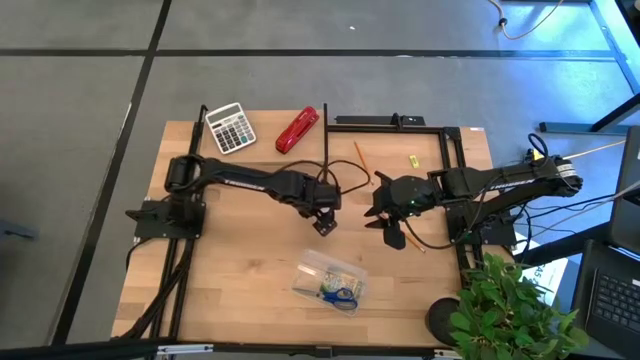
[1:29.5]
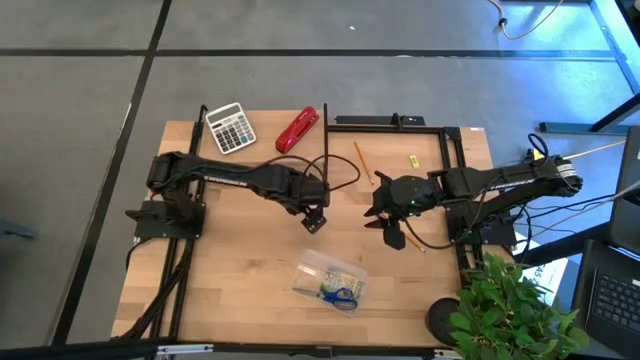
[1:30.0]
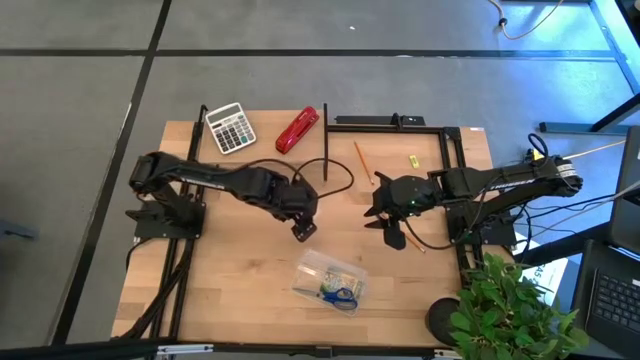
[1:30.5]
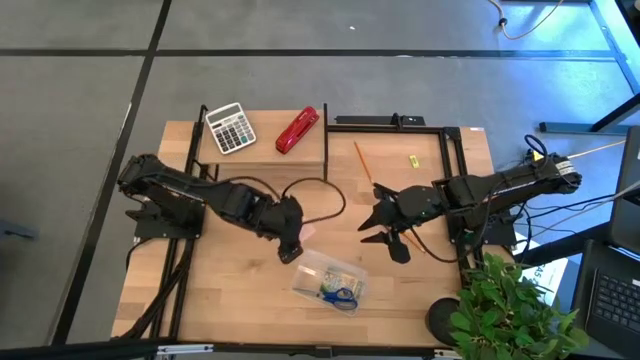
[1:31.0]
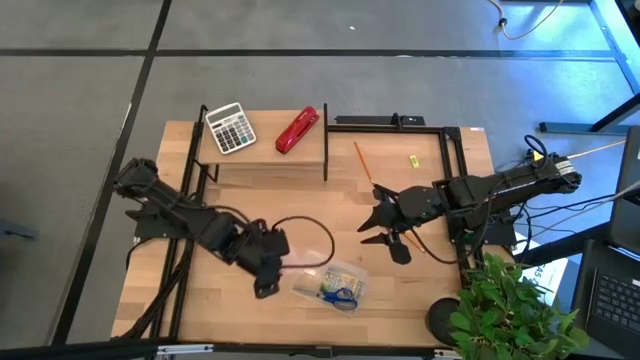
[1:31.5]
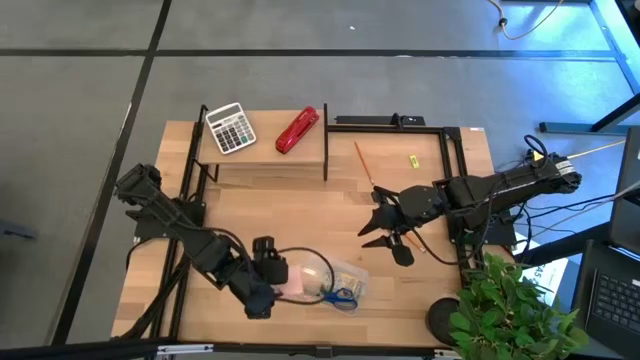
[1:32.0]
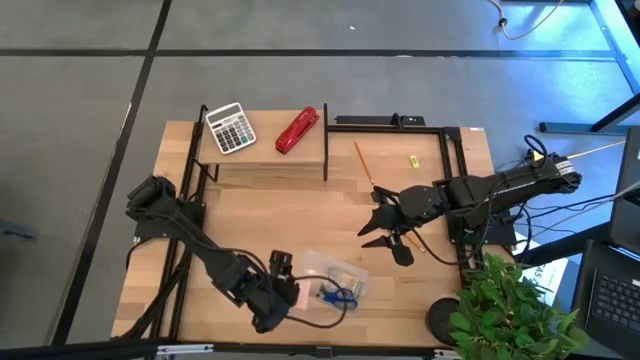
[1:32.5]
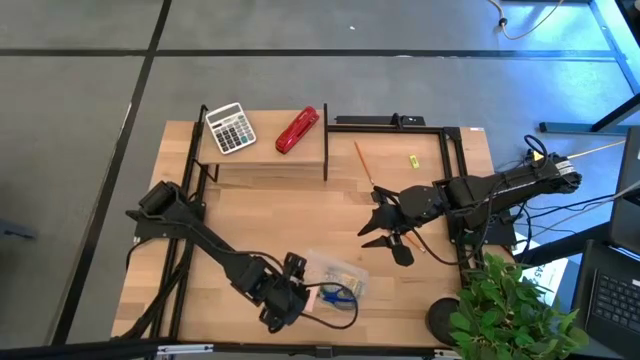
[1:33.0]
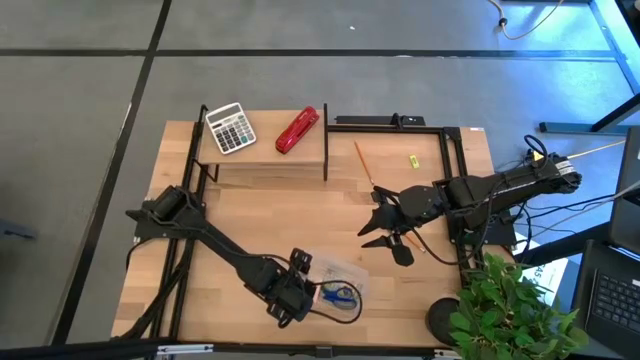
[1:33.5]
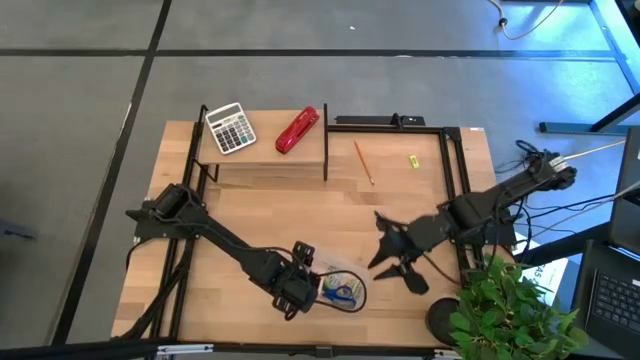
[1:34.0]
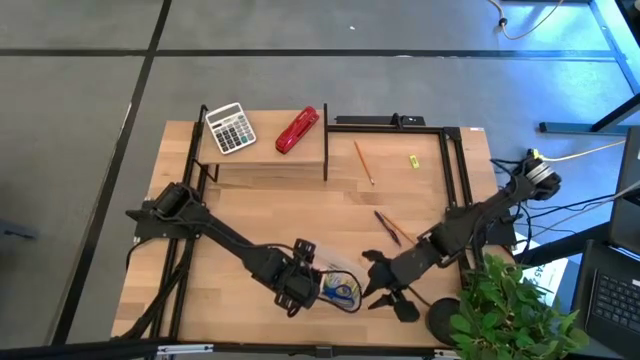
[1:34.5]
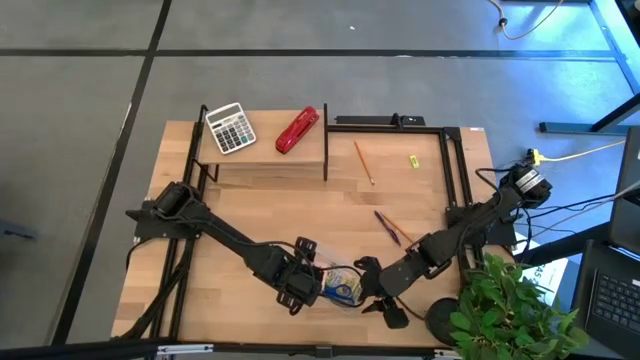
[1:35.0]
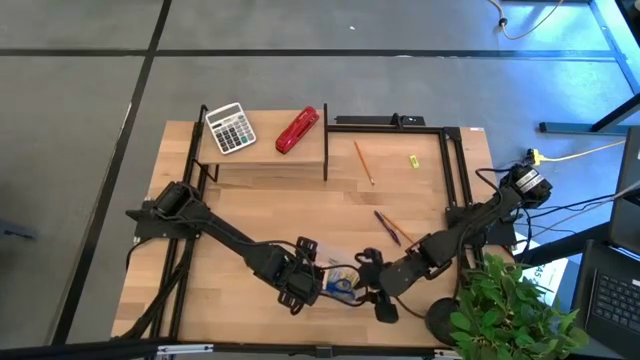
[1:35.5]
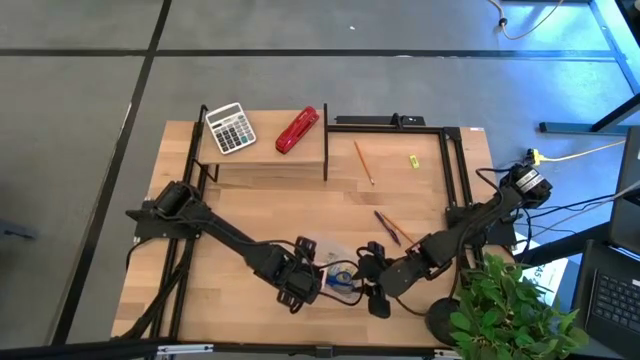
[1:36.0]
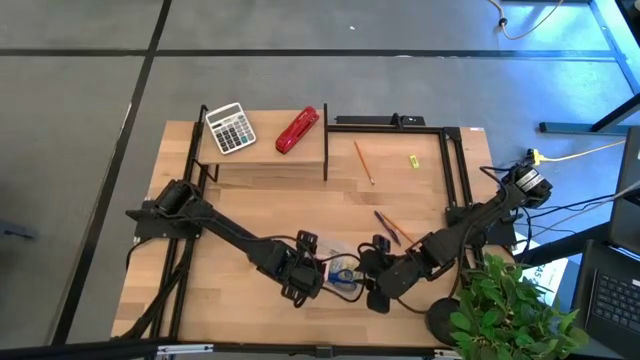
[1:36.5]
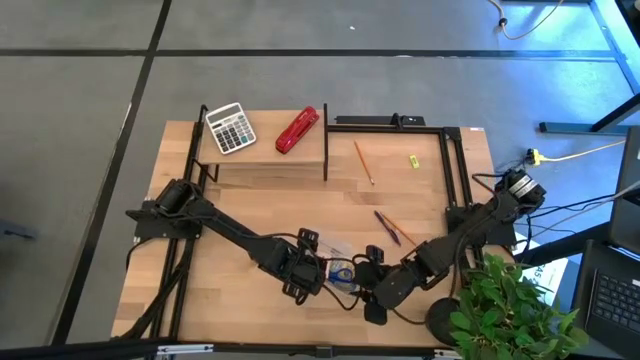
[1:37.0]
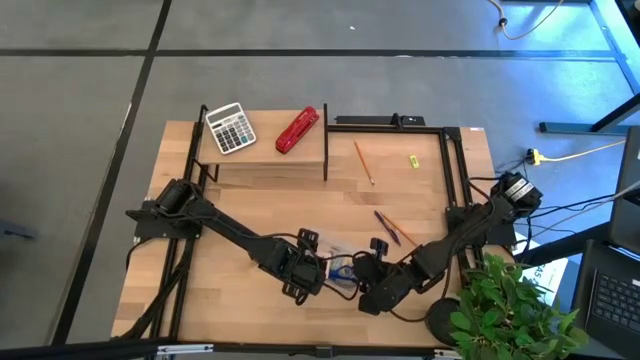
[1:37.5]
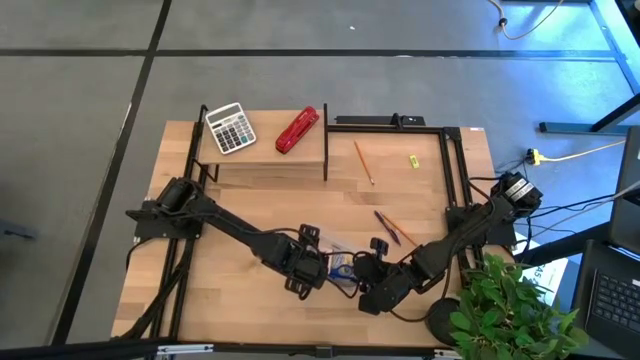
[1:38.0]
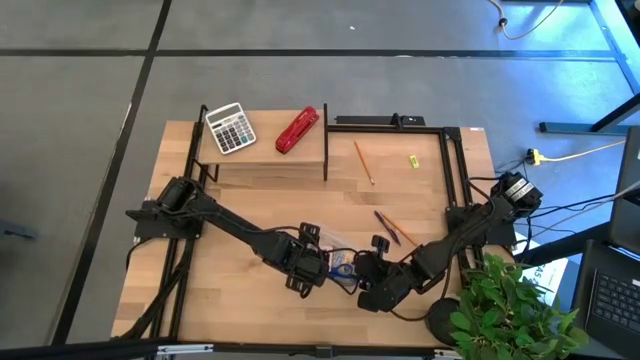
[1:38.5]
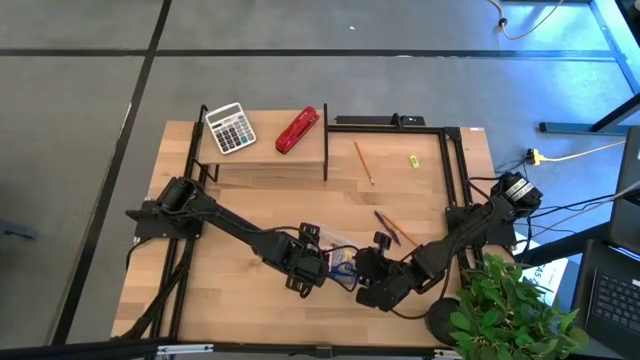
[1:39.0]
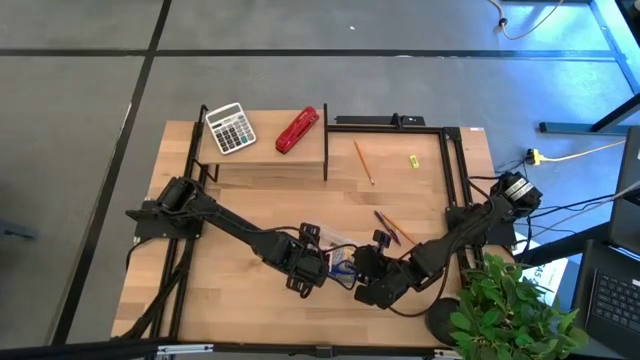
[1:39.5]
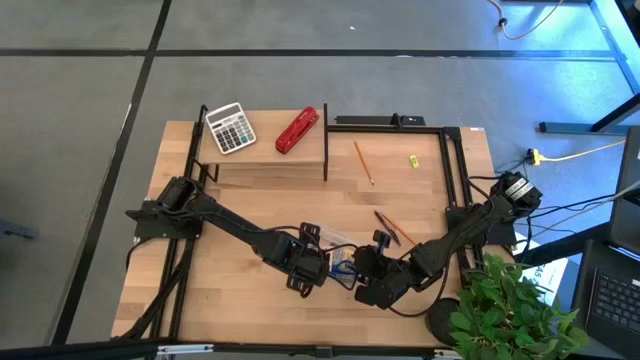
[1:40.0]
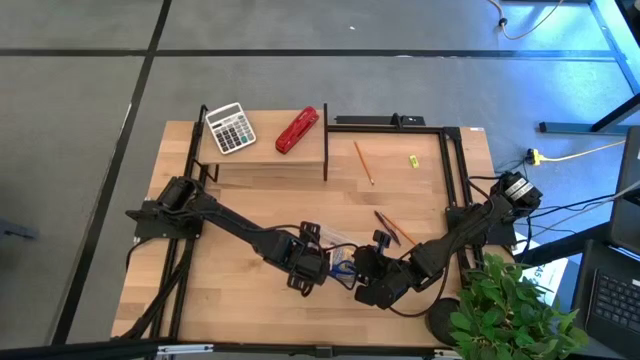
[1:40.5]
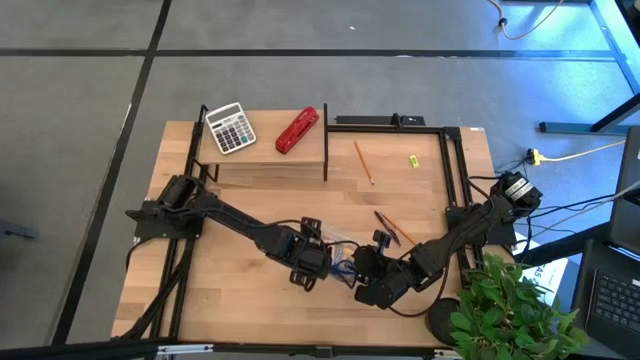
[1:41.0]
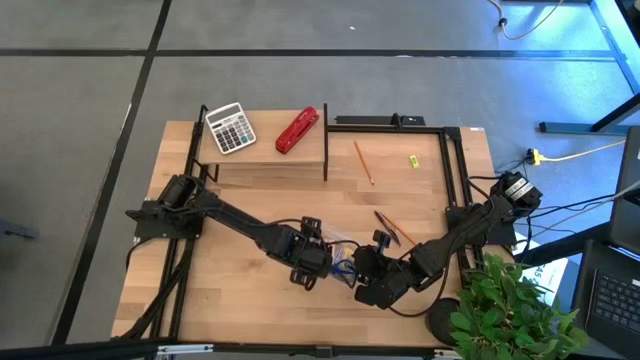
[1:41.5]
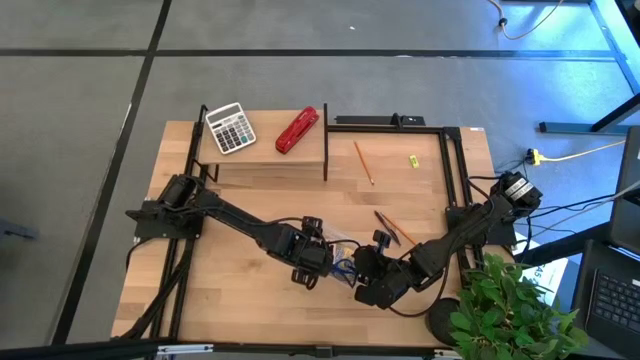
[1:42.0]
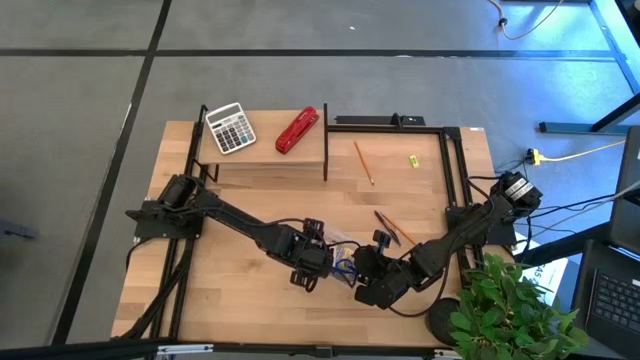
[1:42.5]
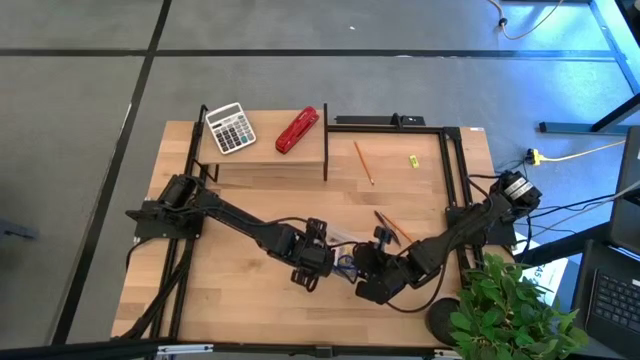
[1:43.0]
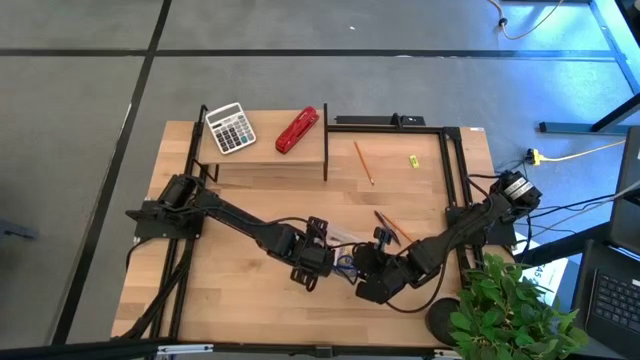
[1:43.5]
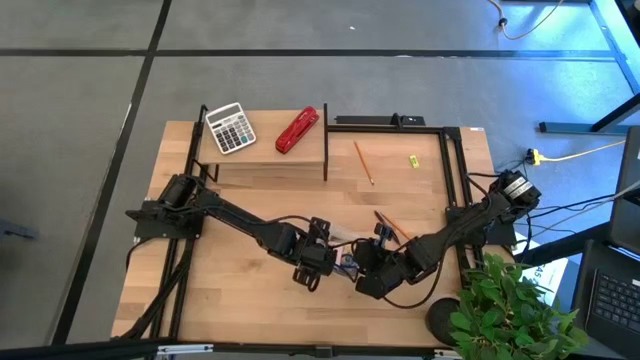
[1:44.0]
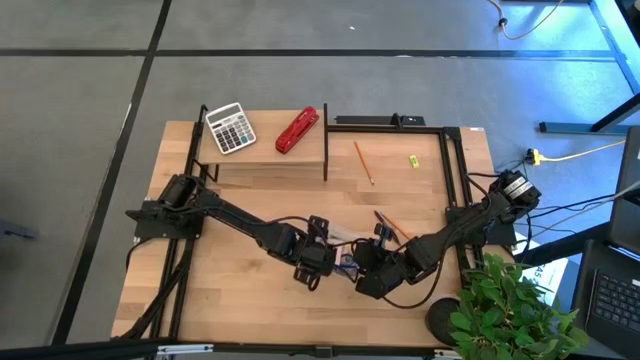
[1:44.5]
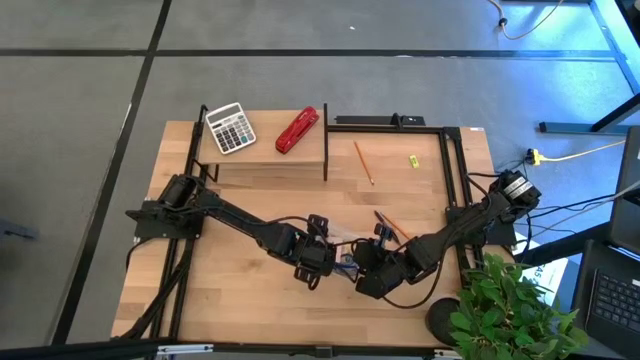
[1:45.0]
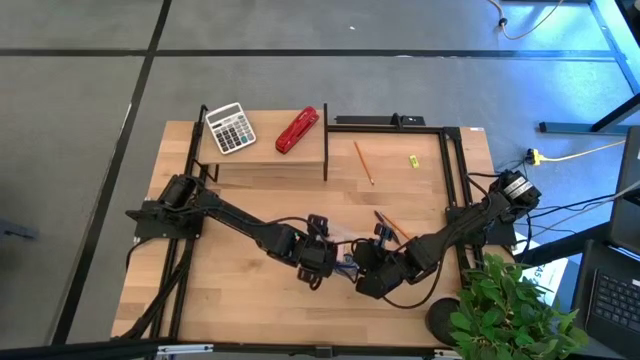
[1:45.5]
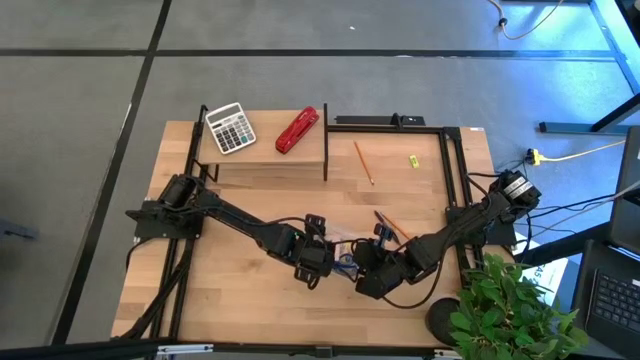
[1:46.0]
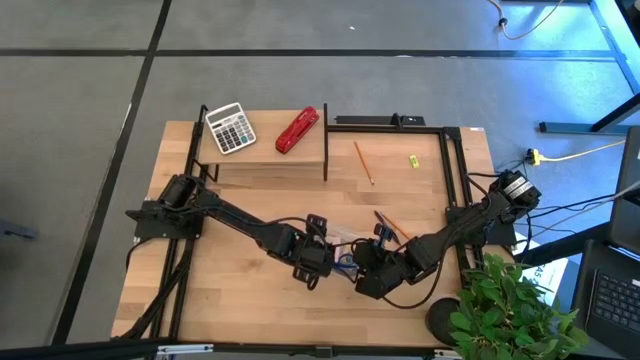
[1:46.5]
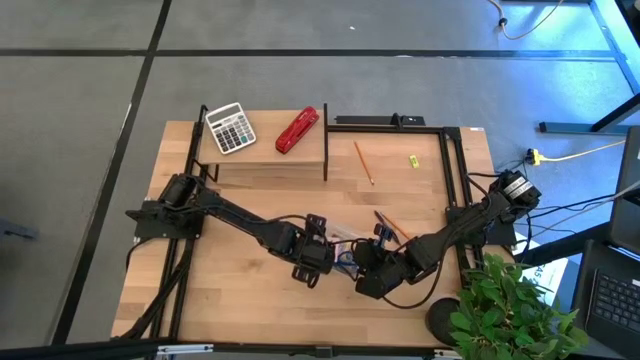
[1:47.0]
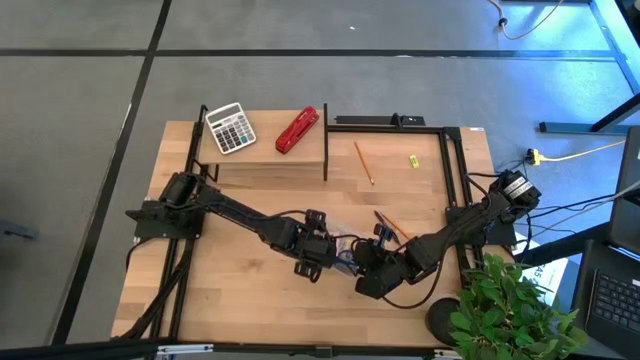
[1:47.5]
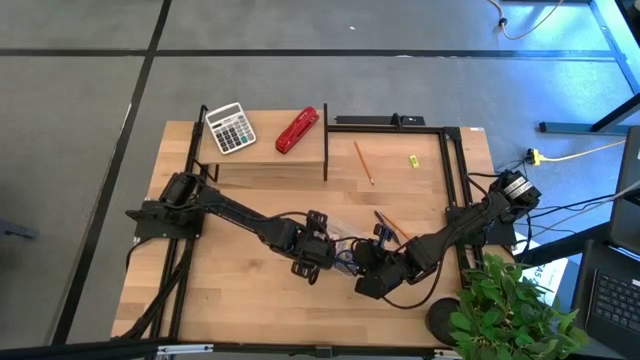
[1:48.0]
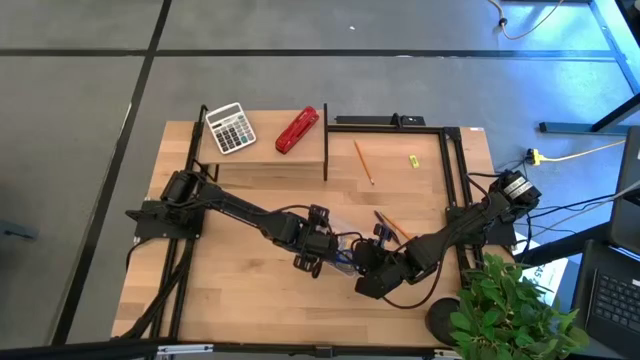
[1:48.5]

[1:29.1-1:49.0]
Task: Pack school essentials
Put the pink sticky note into the transparent supply box
